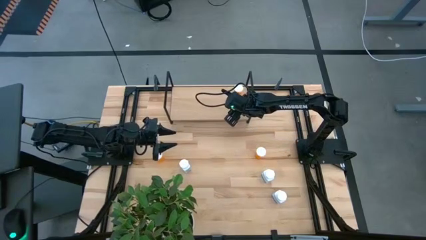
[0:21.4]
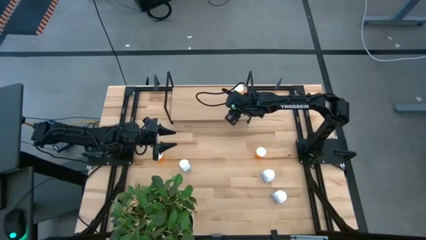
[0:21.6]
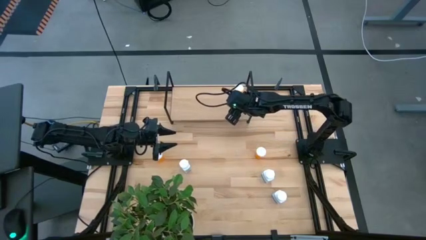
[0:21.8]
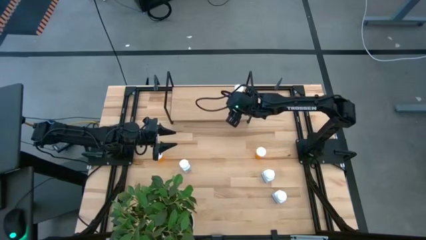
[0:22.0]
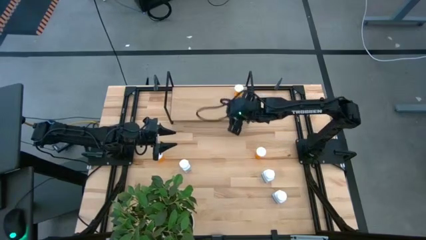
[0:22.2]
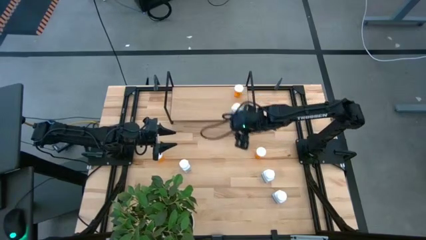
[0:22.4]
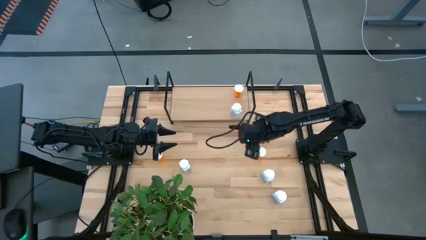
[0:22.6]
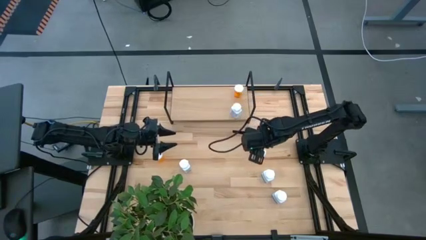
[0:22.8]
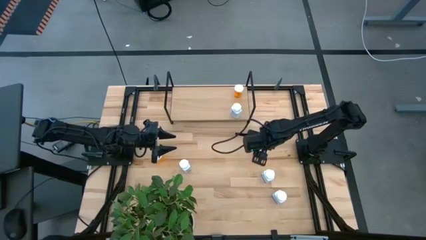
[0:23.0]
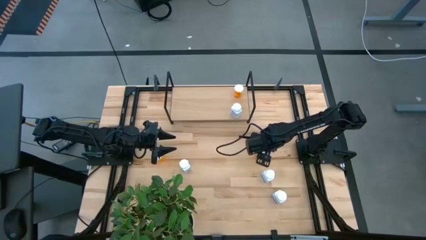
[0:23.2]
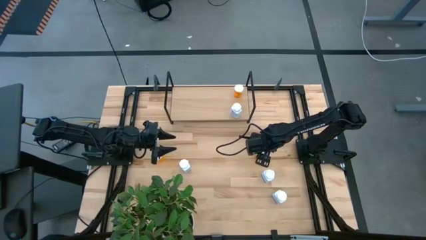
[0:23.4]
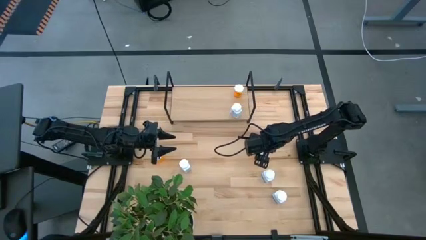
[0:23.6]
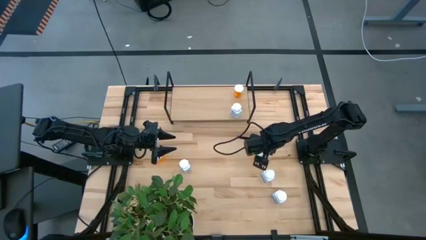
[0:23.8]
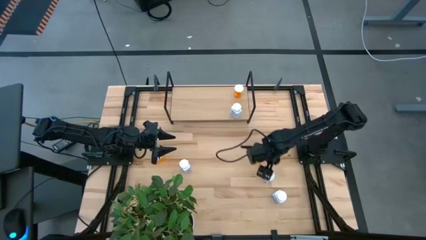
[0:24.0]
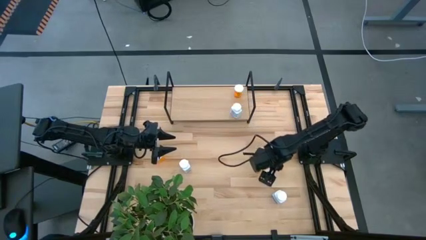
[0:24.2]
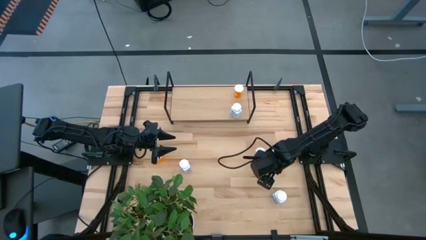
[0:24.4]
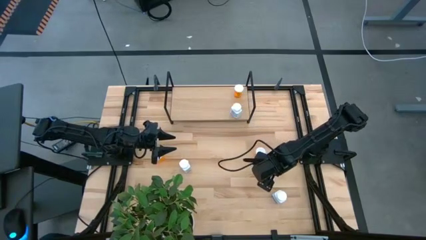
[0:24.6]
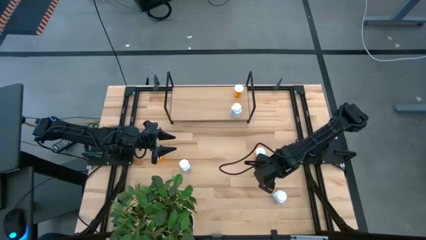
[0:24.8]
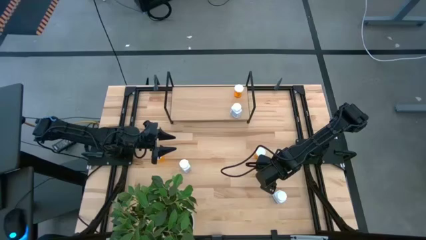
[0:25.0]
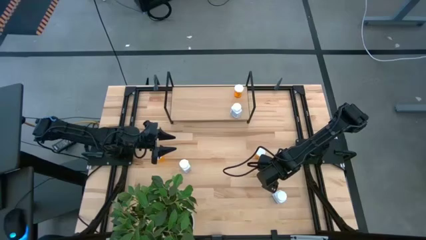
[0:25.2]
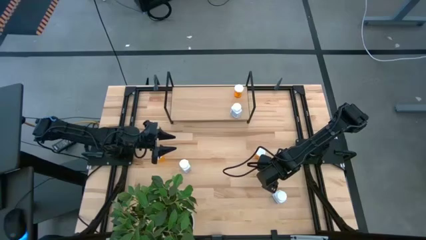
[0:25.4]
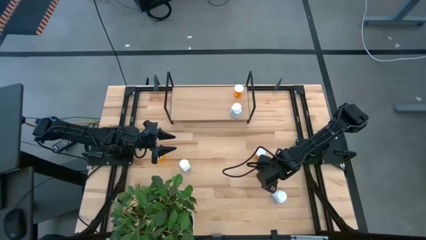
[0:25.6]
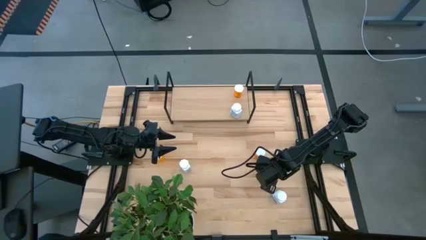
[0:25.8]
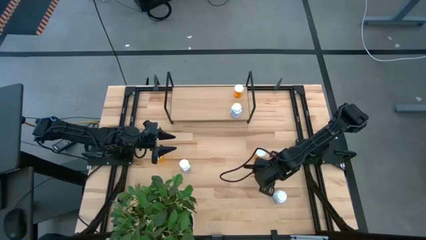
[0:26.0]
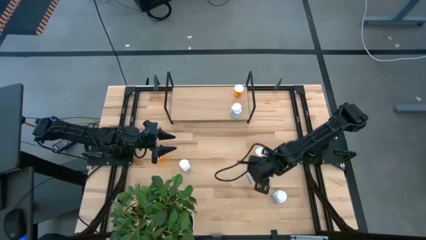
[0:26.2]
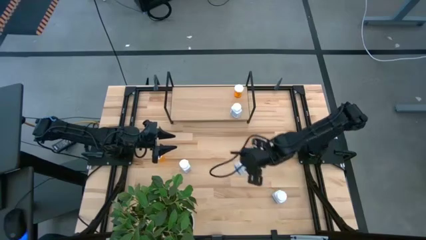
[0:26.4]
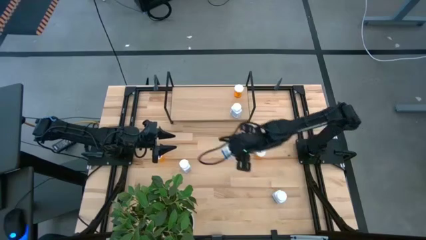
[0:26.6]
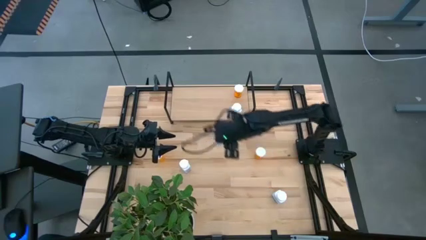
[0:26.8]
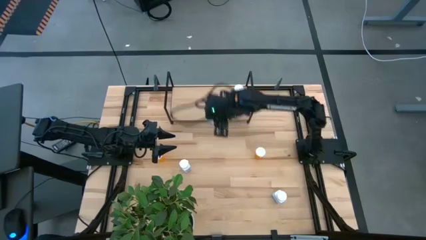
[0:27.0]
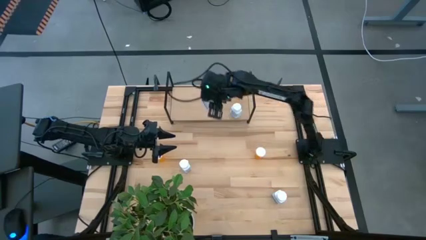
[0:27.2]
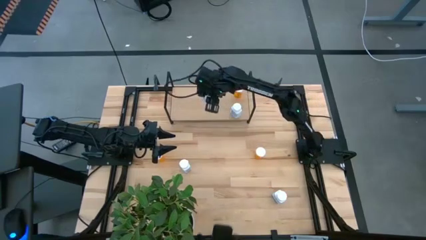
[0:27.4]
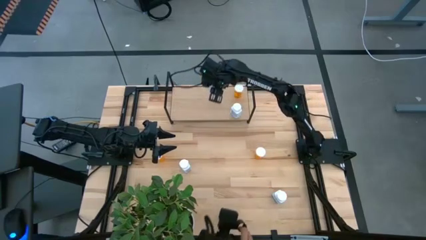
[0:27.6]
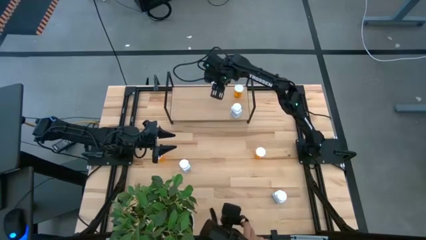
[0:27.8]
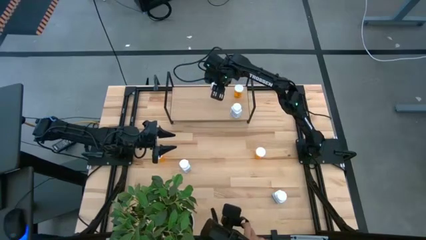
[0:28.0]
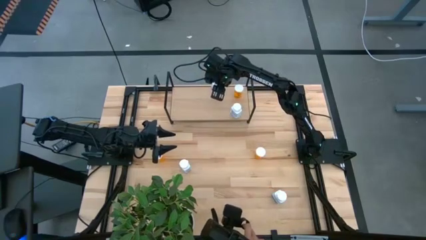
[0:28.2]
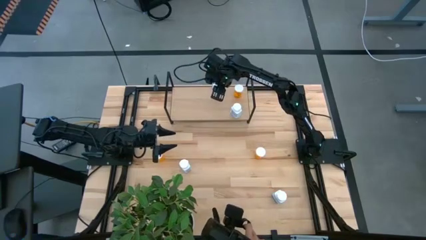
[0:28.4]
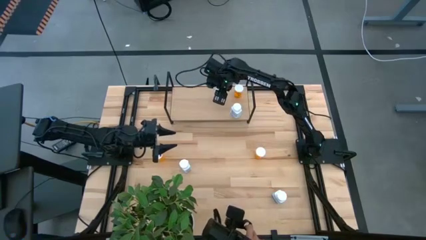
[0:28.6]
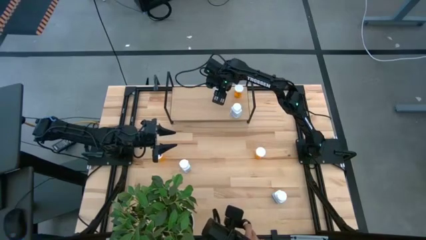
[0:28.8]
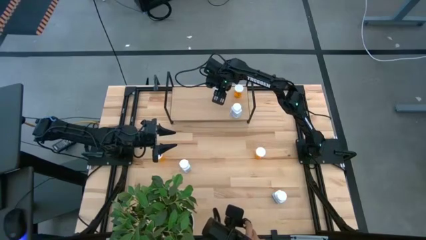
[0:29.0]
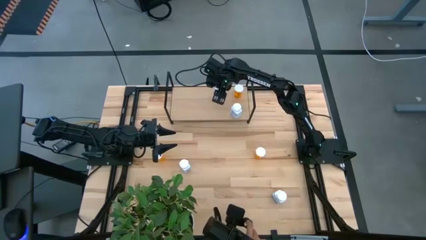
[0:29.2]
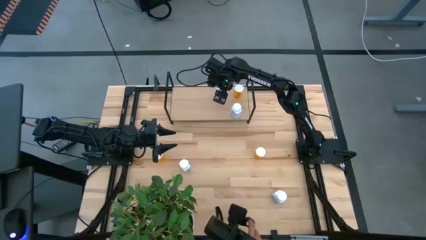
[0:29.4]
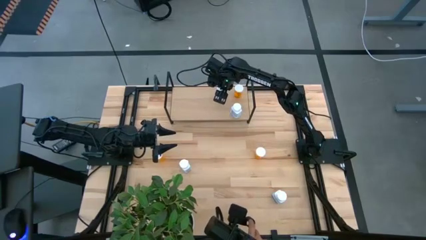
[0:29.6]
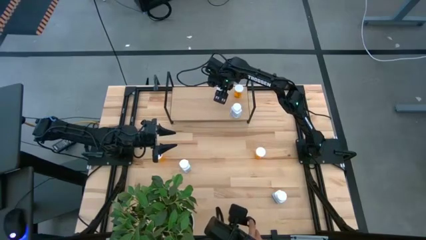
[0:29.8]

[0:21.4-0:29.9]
Task: Pick and place medicine bottles onto shelf by color
Put the white pill bottle on the shelf

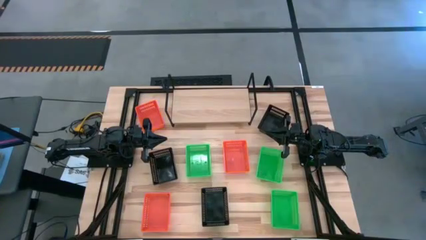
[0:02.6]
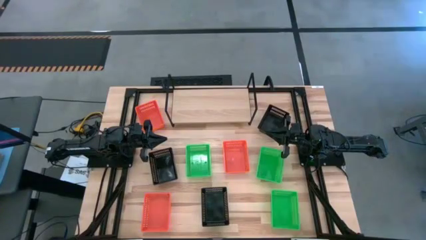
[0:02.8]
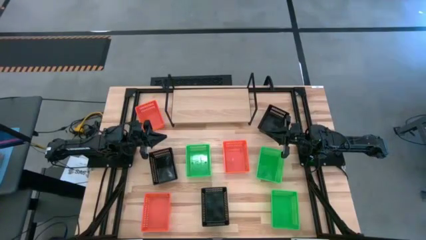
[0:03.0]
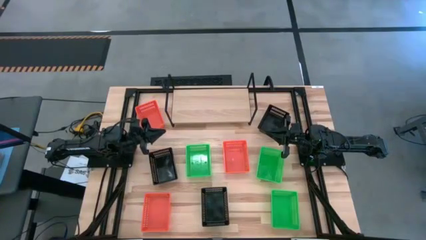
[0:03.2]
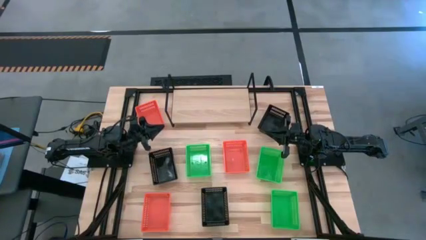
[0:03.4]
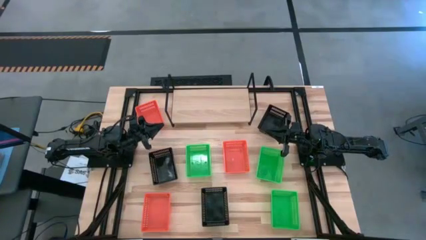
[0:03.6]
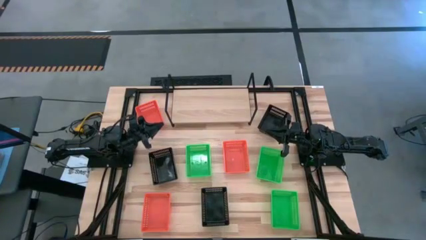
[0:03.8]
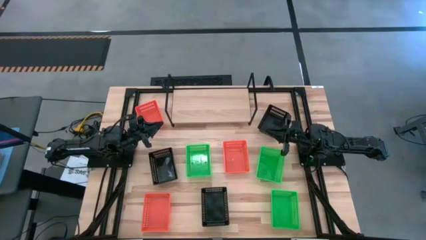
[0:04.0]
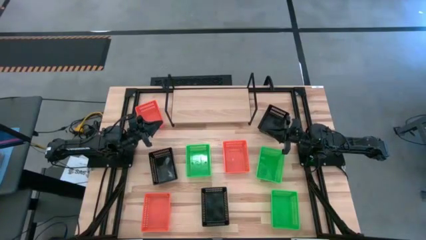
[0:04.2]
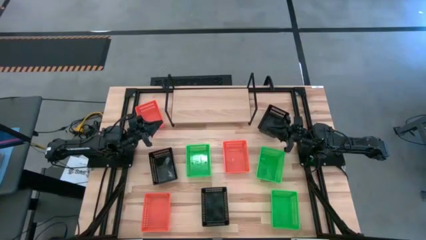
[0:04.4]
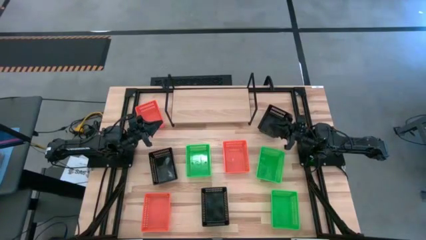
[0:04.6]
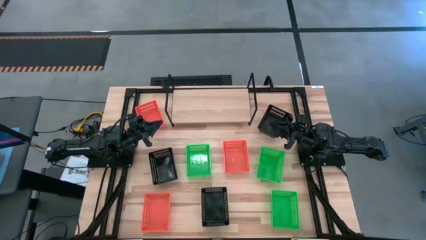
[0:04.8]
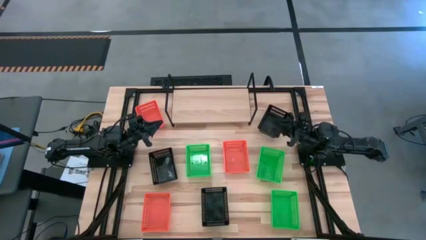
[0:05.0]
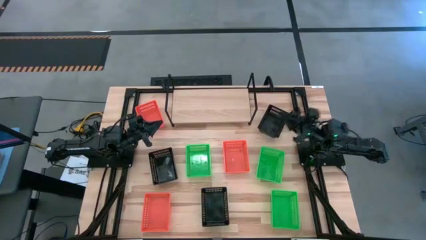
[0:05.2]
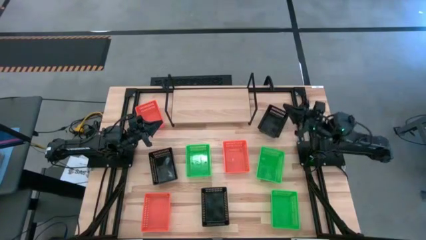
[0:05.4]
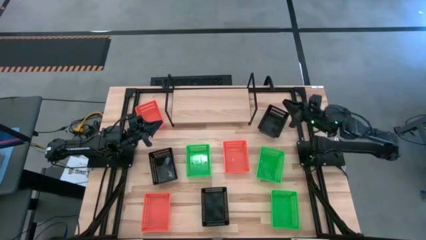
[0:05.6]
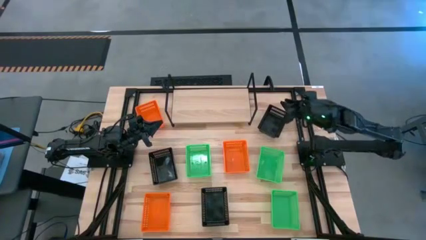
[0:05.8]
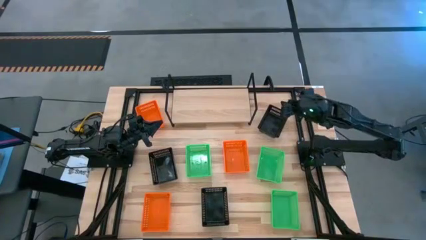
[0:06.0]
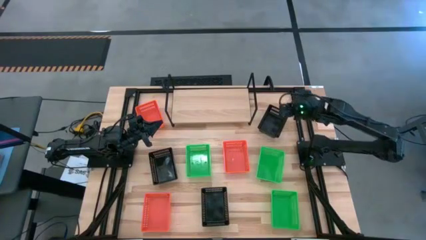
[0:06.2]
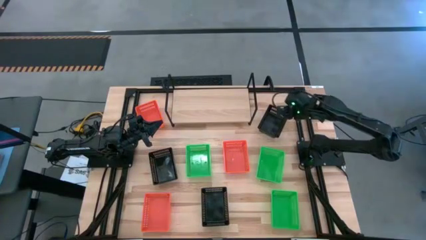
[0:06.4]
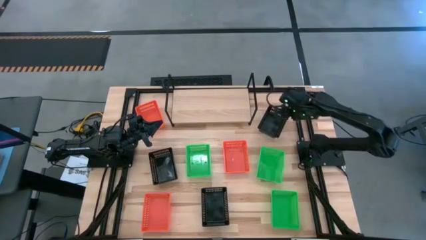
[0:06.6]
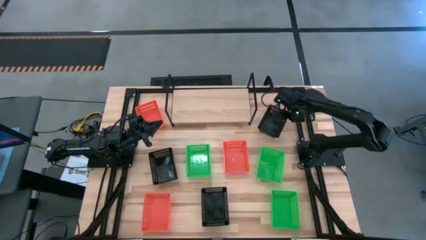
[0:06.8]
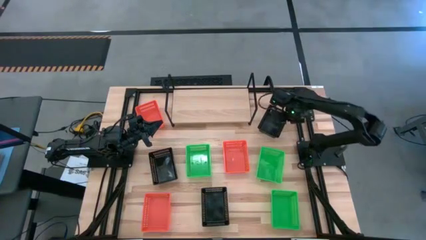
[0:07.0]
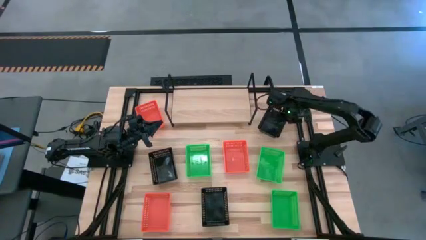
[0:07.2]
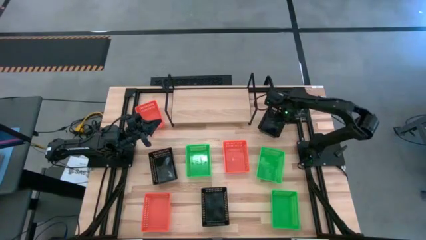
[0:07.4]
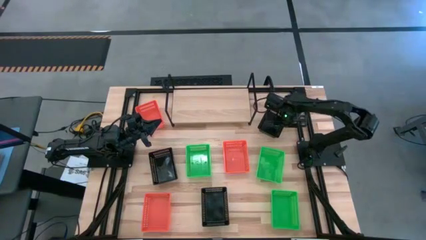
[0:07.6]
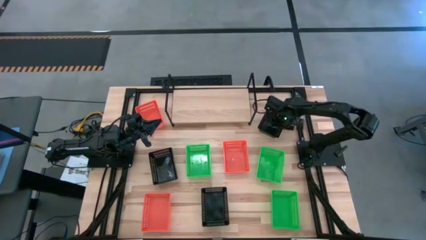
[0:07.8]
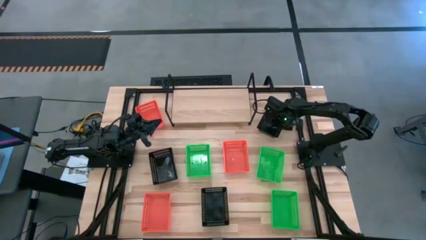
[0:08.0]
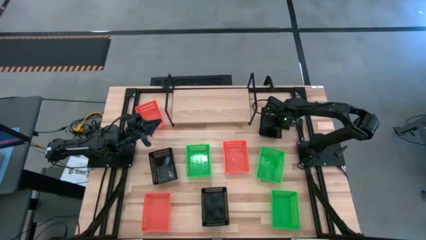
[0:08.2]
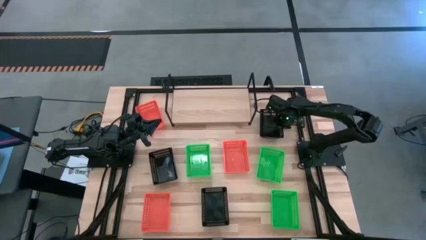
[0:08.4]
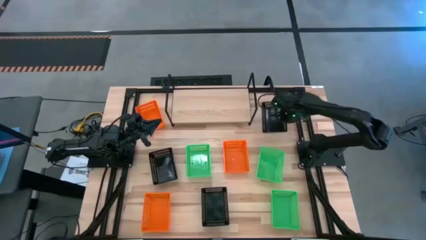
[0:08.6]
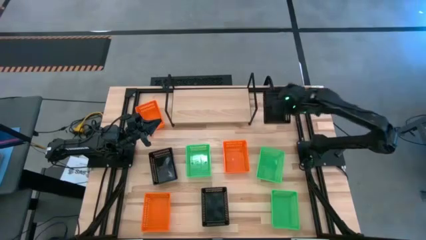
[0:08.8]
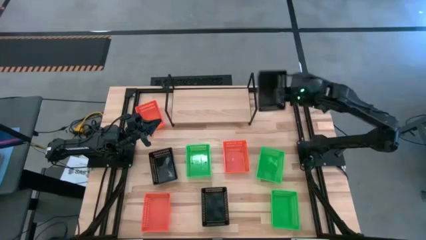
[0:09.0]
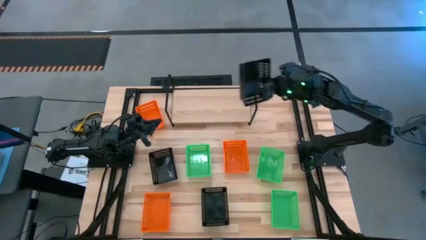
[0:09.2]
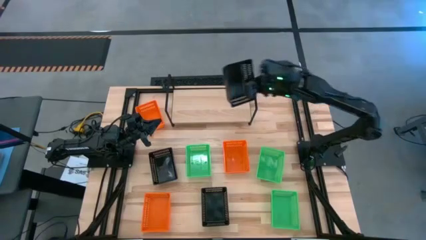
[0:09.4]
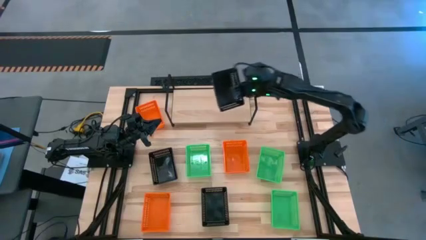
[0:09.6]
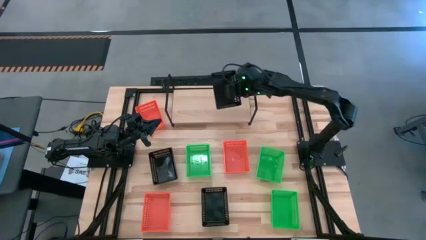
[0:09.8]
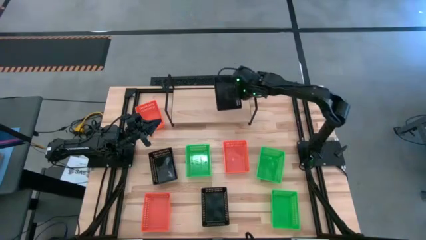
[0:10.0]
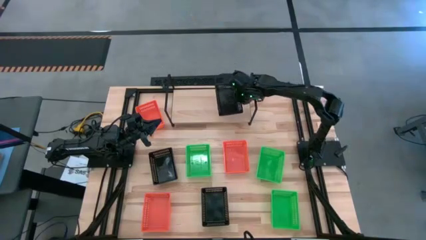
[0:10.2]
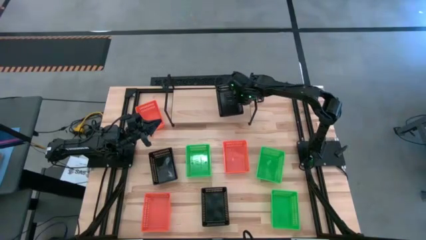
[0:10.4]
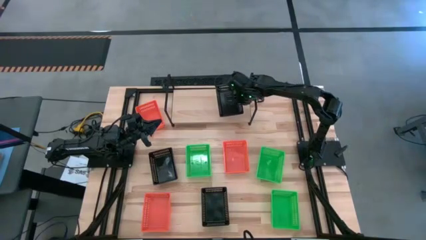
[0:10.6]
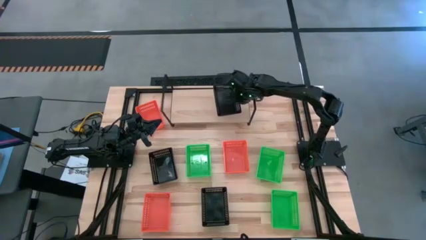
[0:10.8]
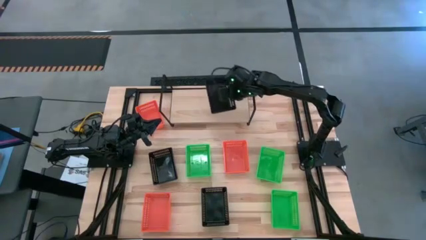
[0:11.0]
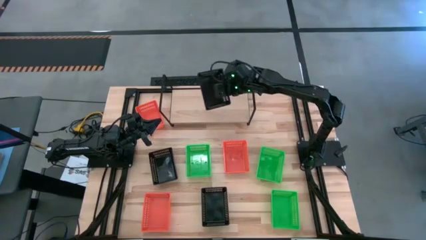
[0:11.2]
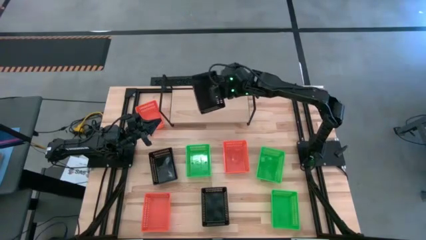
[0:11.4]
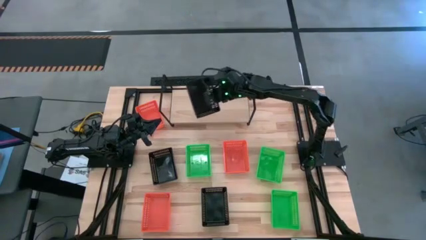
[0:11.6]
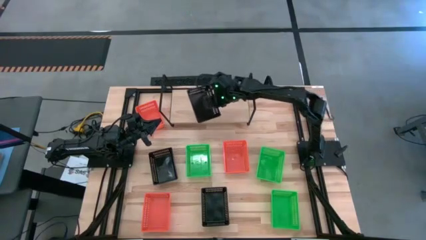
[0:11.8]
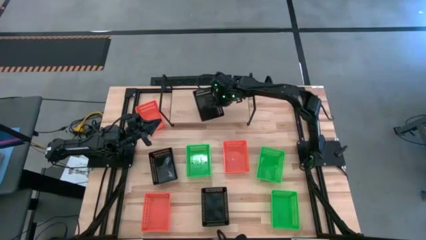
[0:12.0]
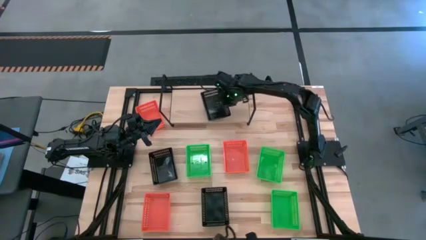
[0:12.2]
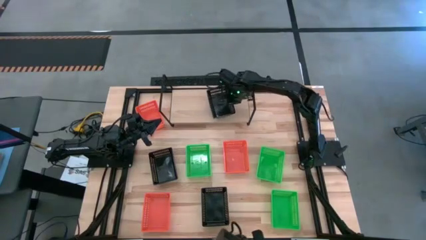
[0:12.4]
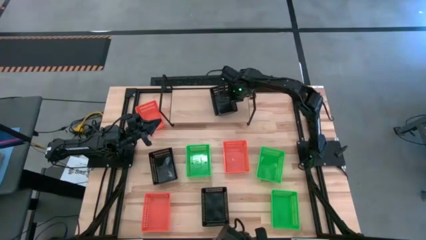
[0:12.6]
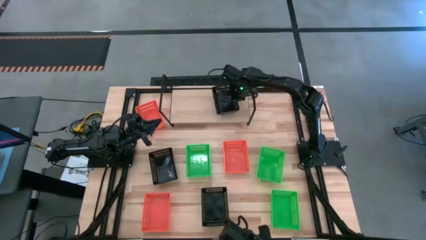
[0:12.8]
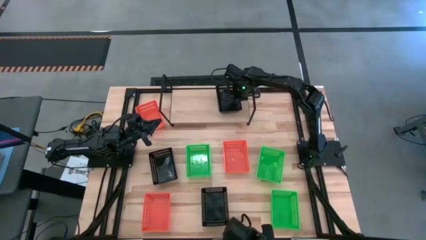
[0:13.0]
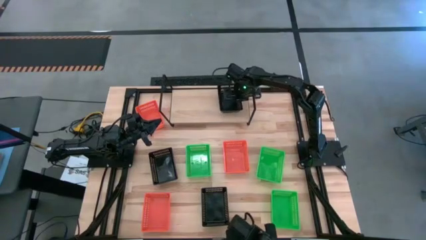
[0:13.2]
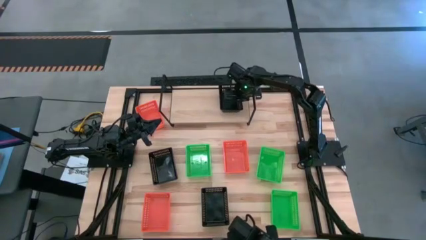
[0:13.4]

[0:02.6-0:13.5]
Task: Stack baskets on shelf by color
Put the top black bin on the shelf
